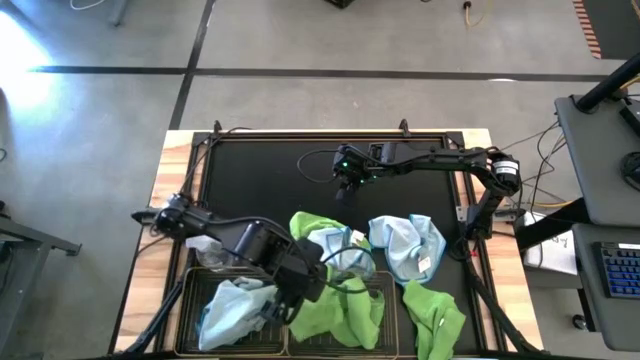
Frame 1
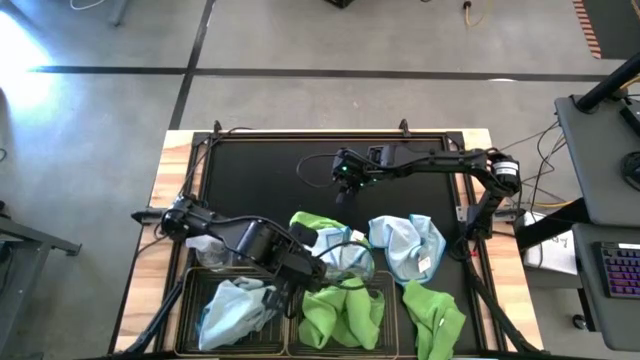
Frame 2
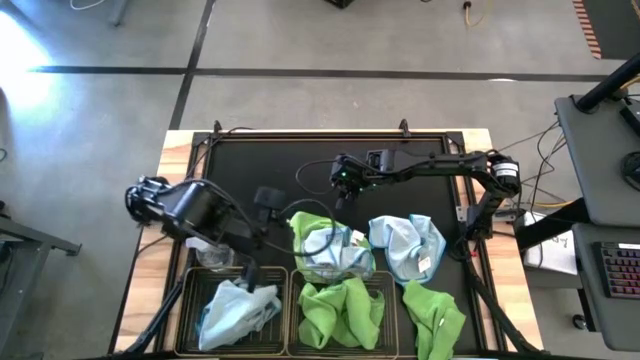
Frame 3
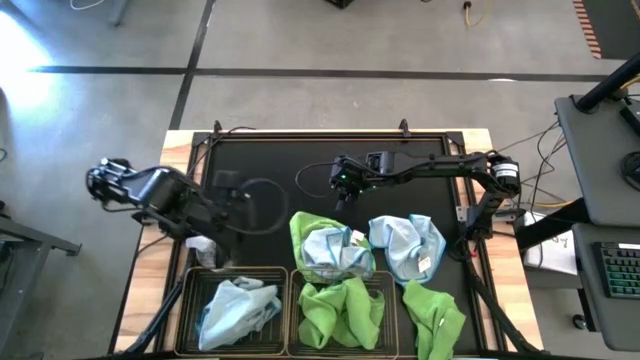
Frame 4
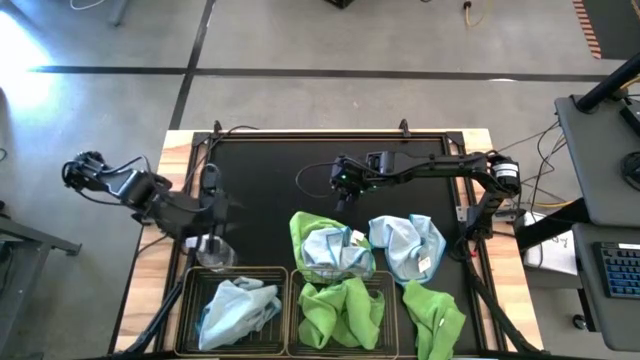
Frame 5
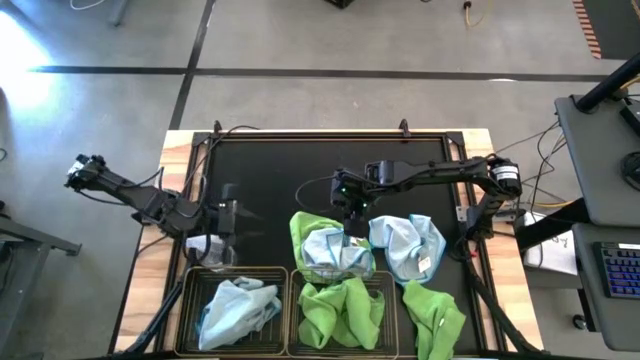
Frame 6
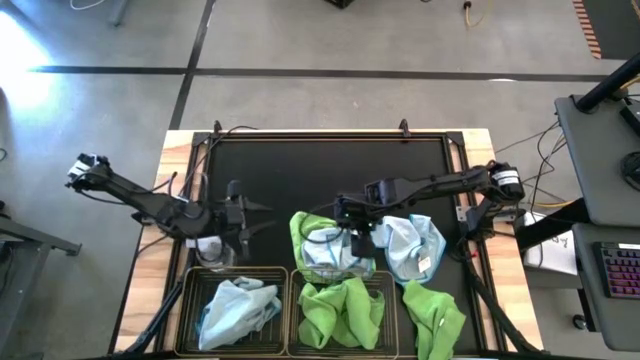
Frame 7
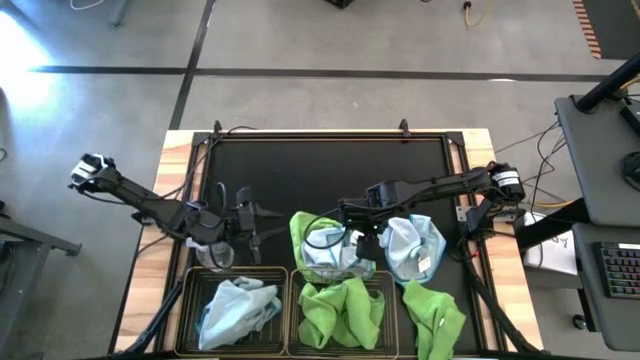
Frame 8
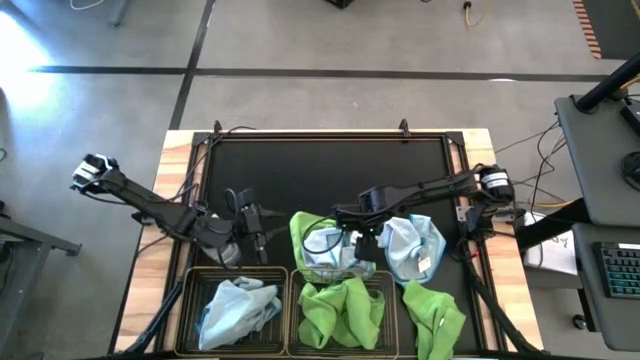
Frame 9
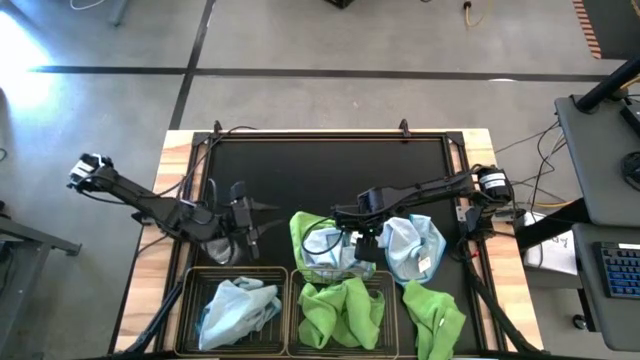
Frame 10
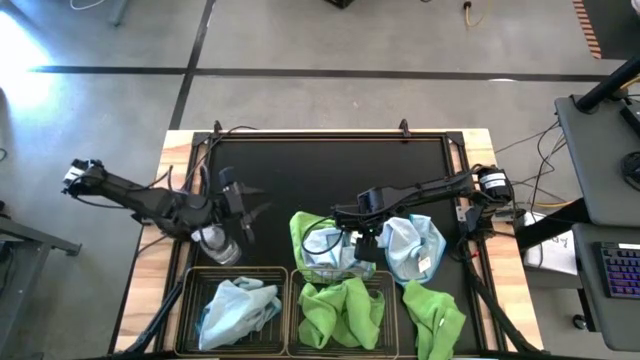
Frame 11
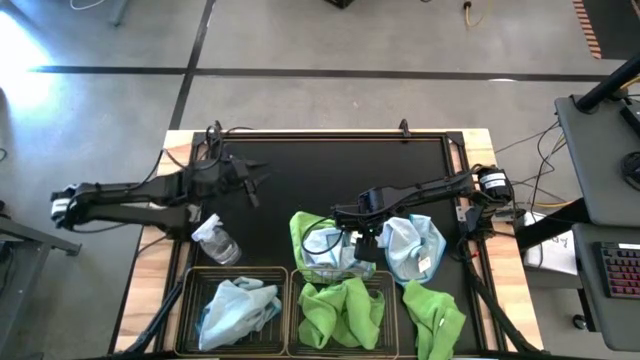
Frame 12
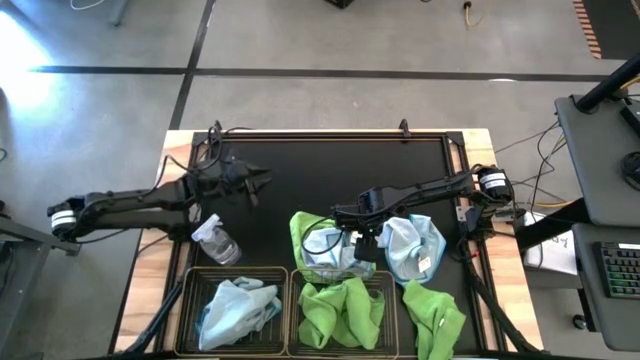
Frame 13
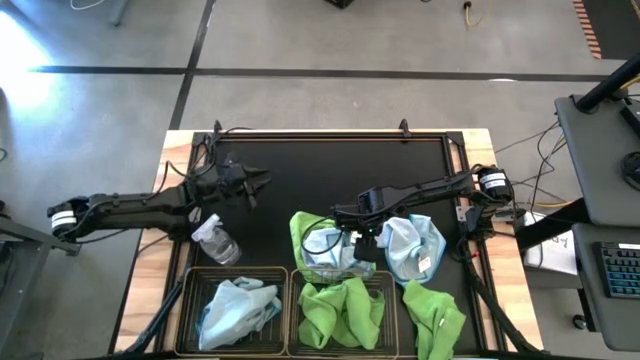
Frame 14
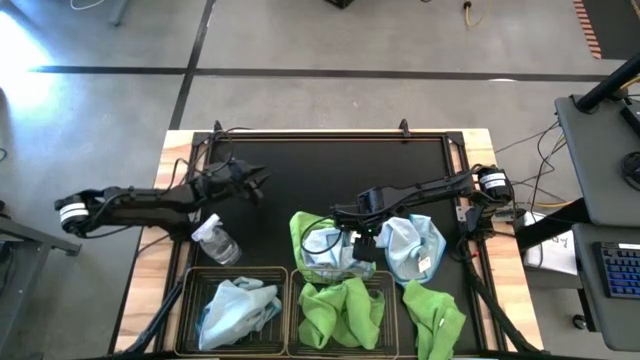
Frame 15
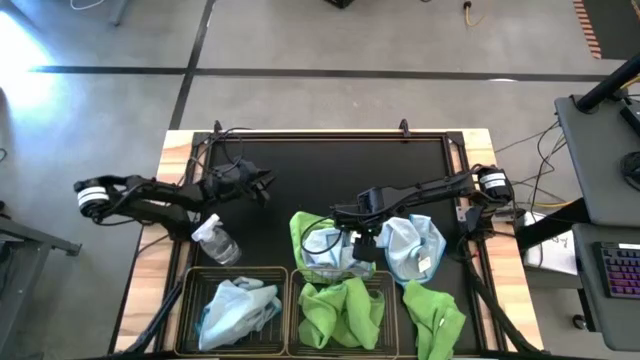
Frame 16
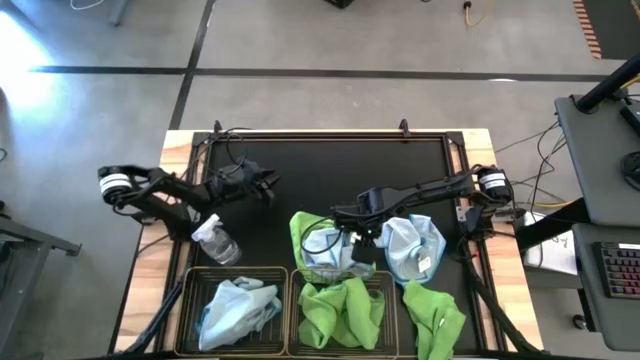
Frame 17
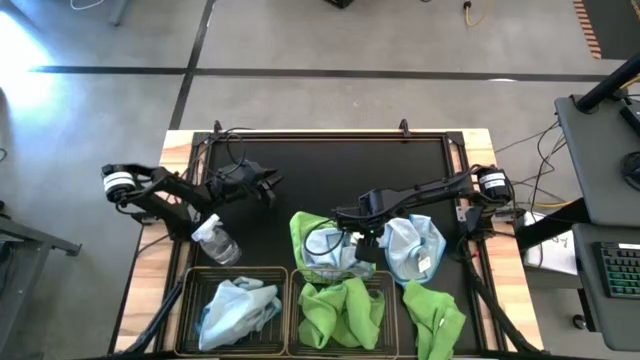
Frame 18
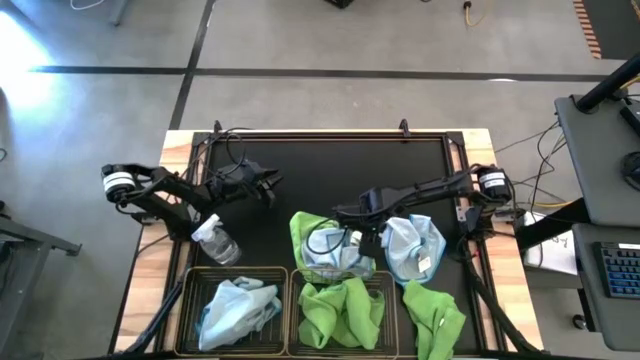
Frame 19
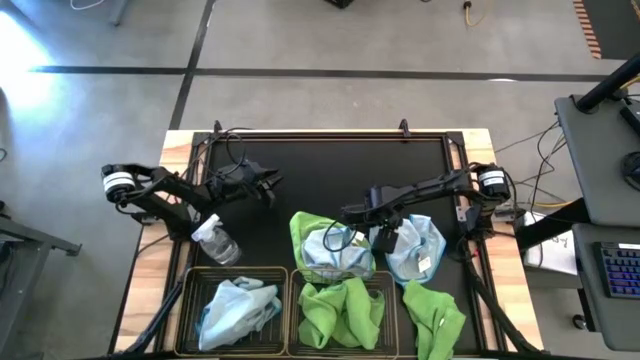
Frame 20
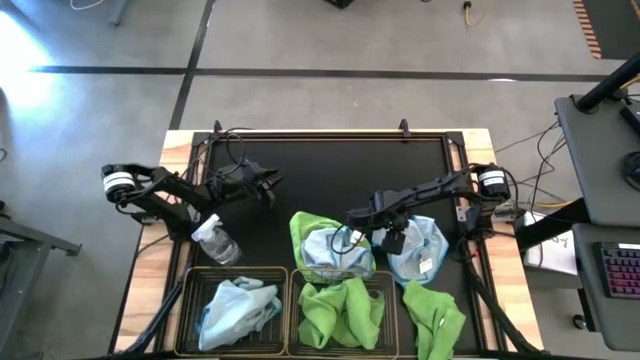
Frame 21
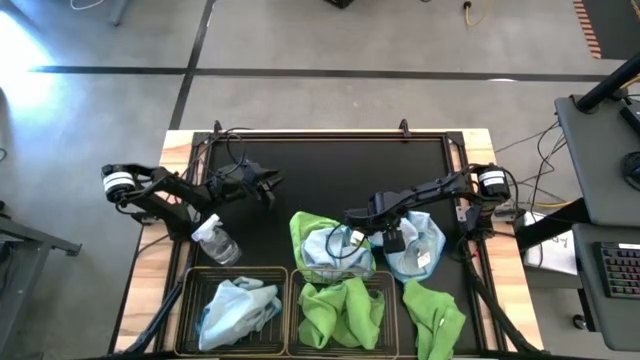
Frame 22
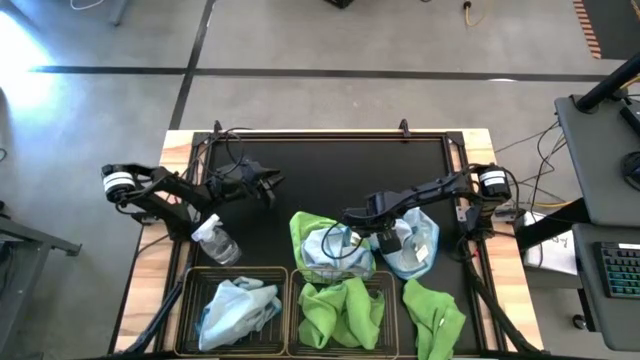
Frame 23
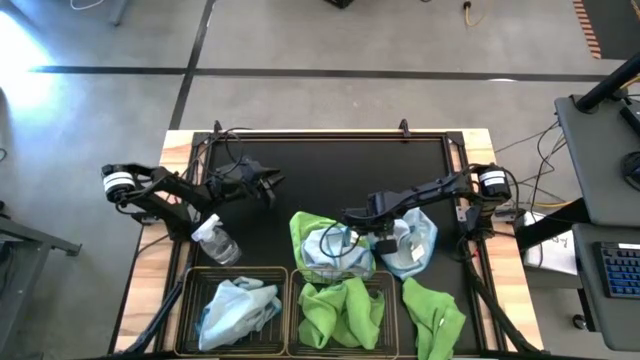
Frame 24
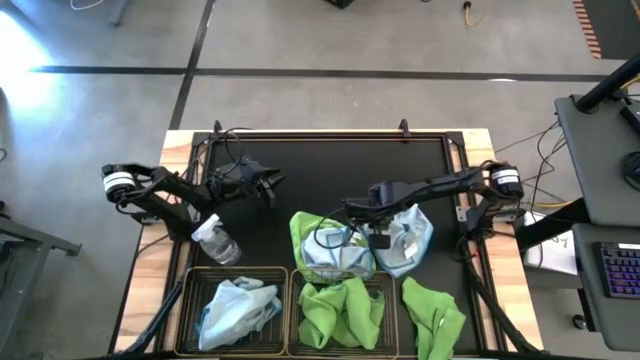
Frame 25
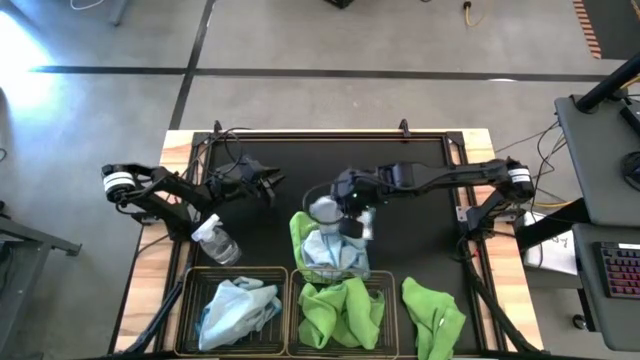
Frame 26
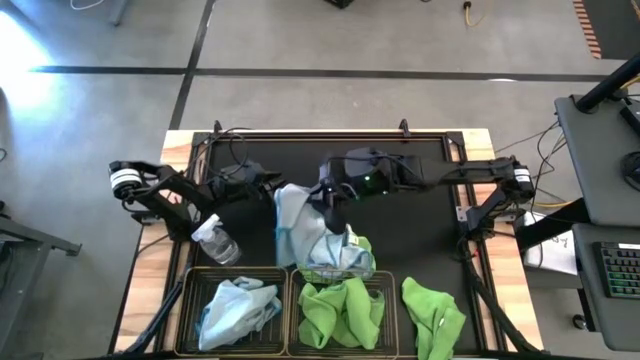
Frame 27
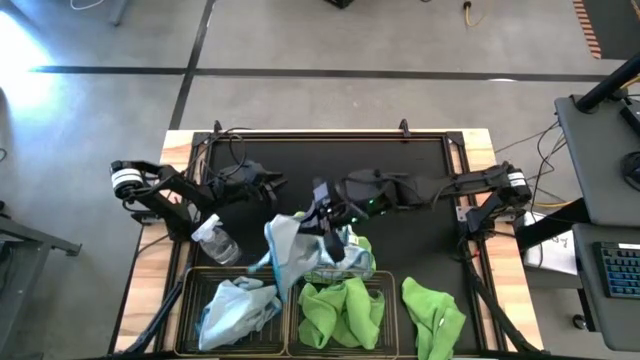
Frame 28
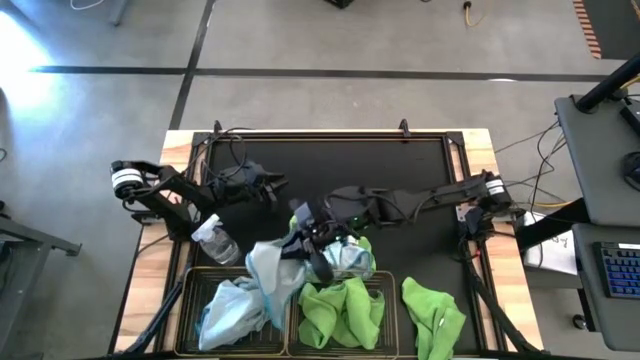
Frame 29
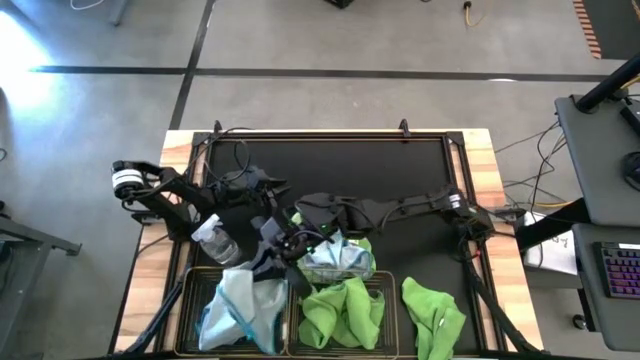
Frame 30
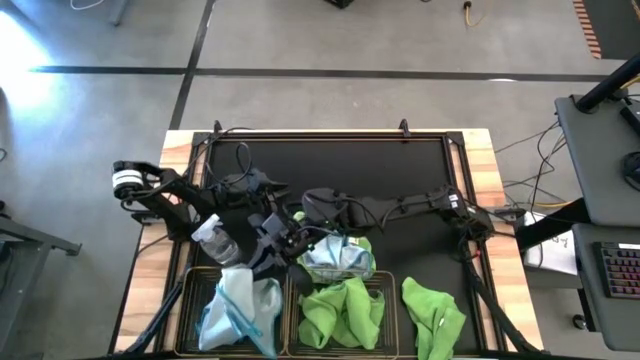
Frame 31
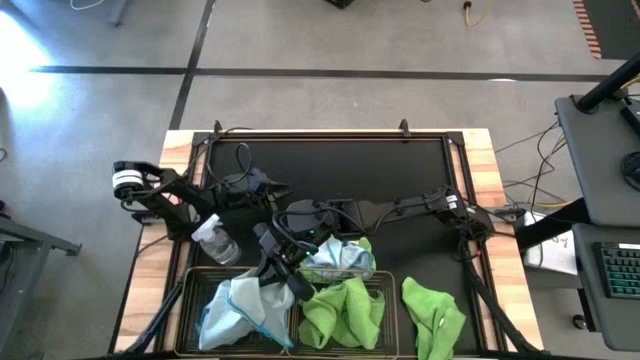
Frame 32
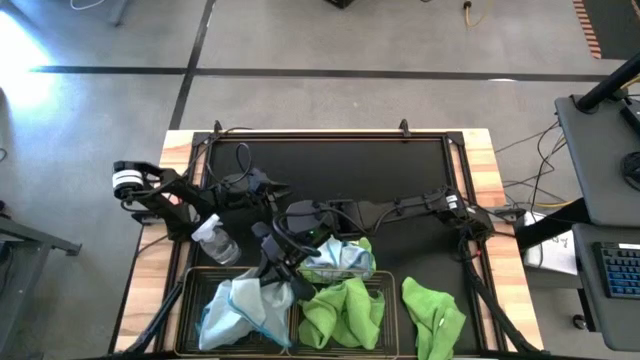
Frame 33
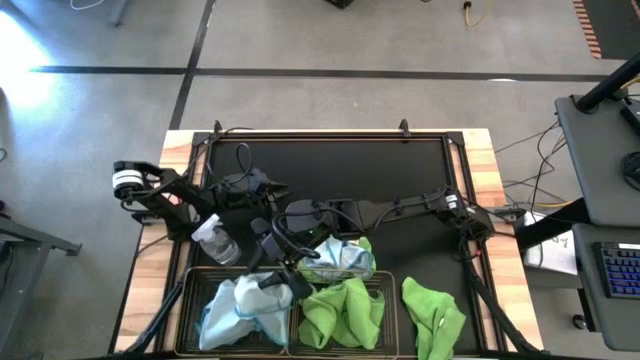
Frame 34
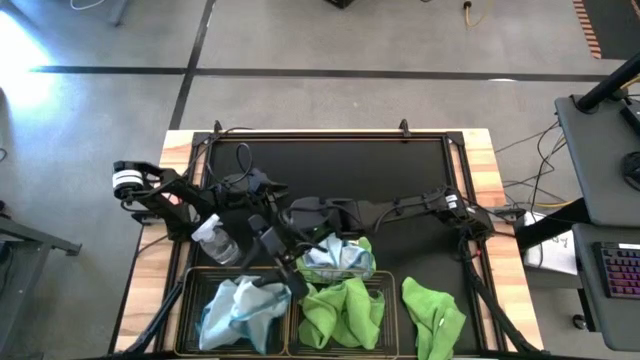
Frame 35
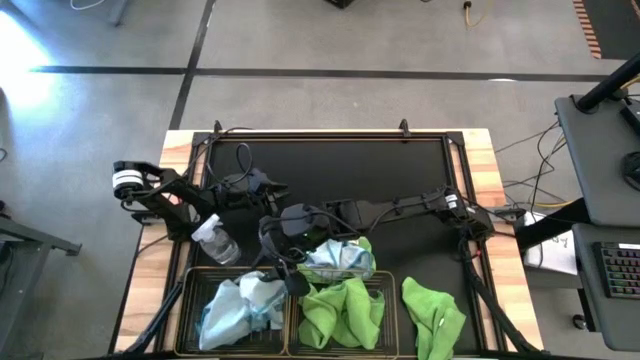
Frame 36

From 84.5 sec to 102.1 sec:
Task: Sort microfiber towel by color & place in baskets
Put the right blue towel into the left wire basket

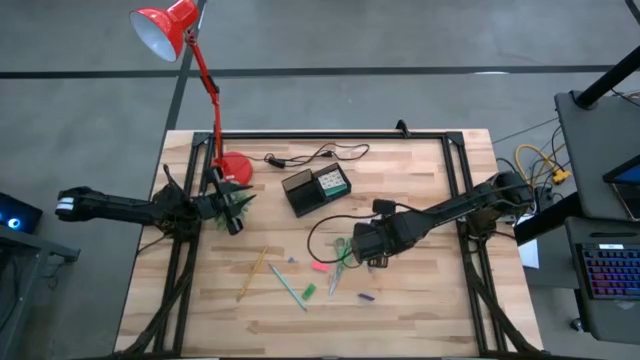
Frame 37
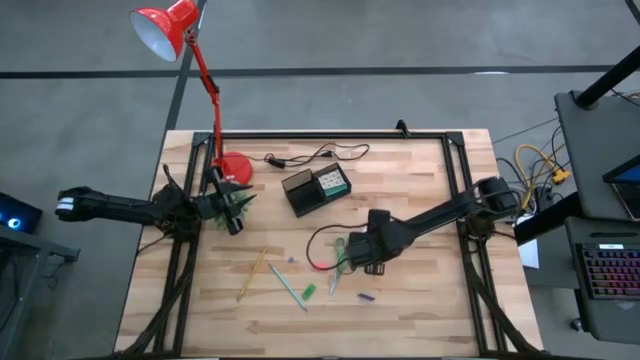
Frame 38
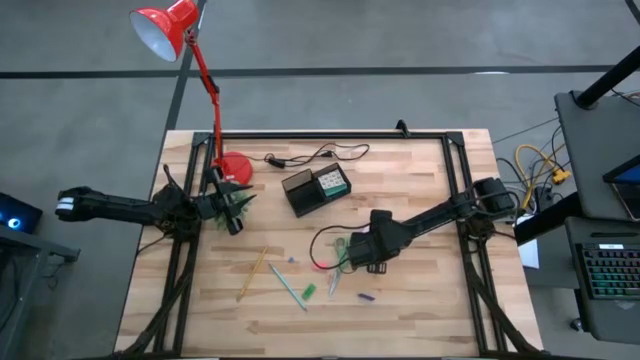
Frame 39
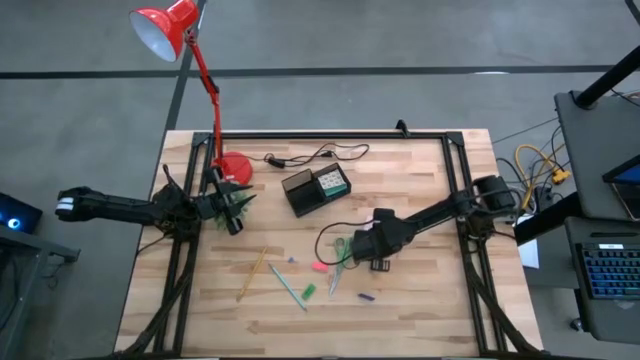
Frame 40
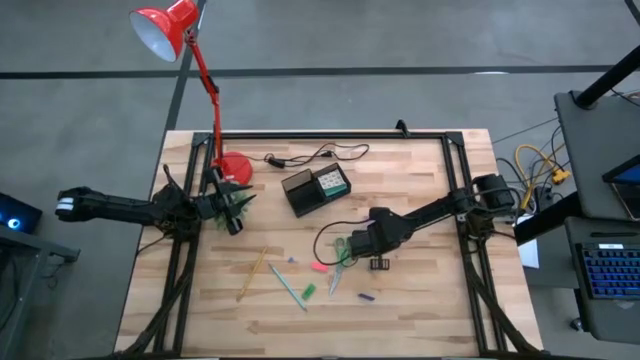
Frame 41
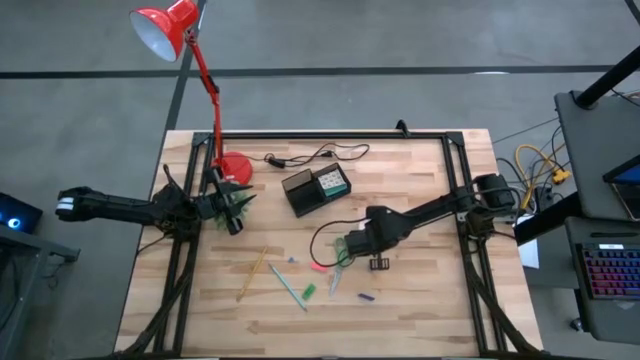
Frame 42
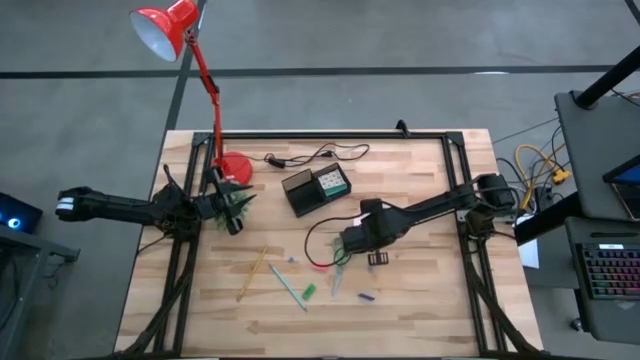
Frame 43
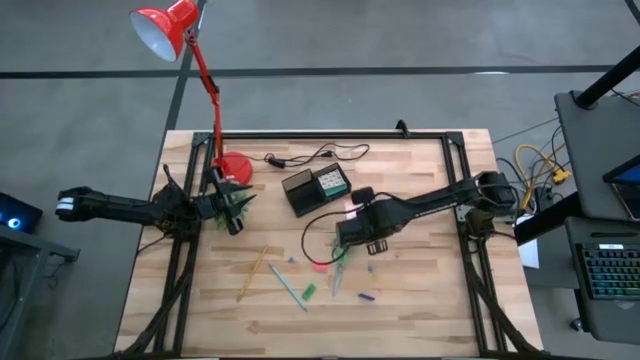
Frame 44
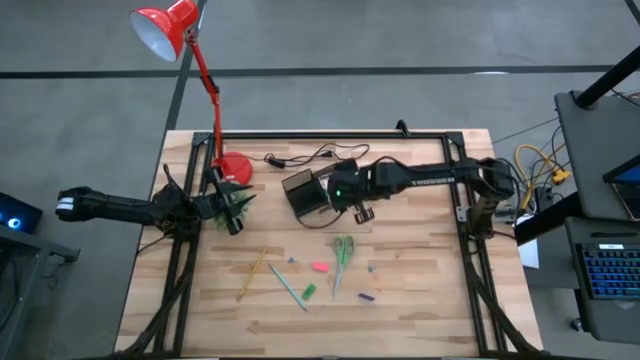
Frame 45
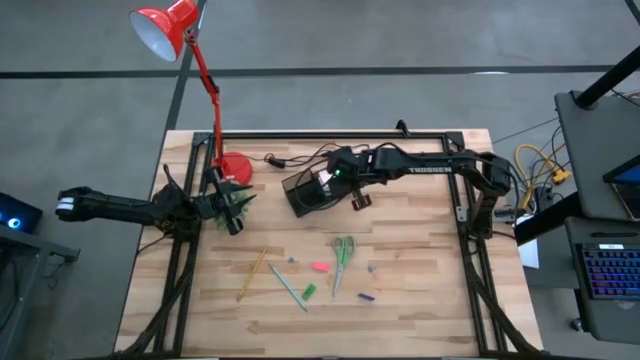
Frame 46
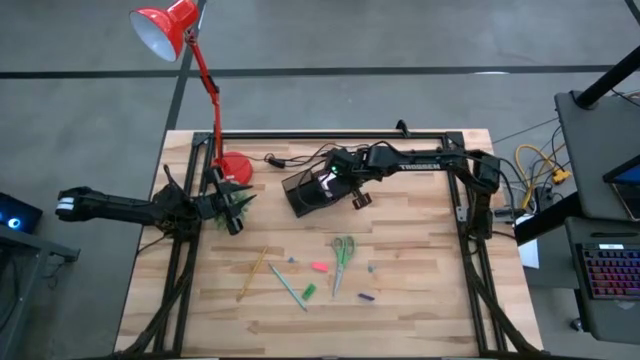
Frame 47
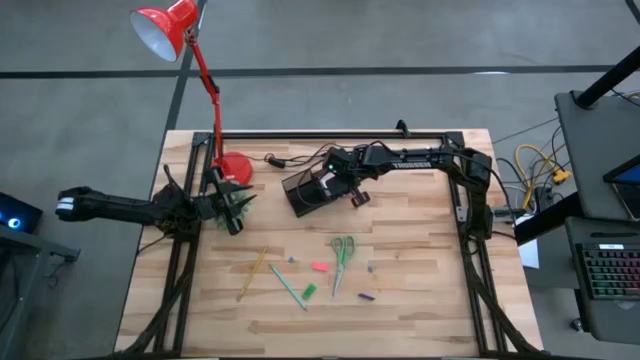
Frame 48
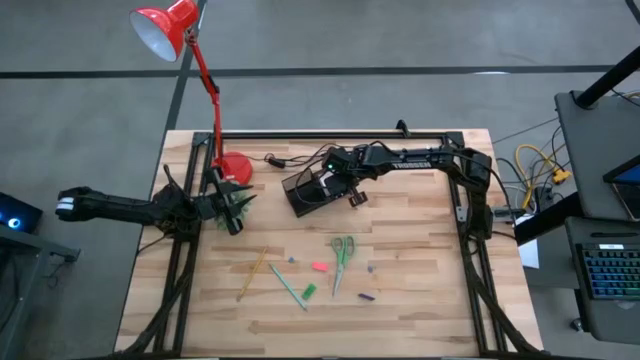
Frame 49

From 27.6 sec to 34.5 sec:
Task: Pick and place office supplies into organizer
Put the pink sticky note into the black desk organizer
